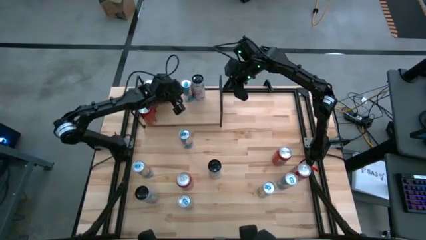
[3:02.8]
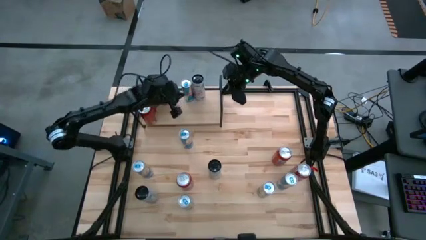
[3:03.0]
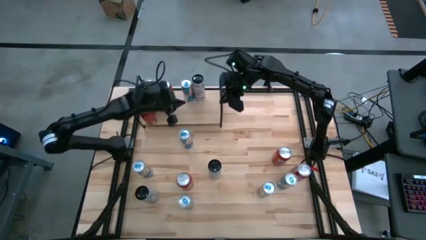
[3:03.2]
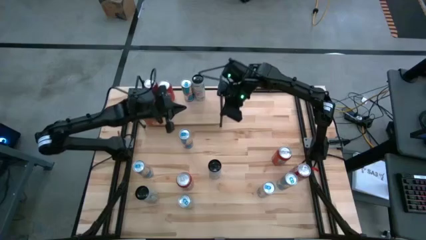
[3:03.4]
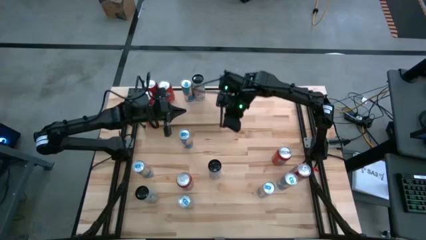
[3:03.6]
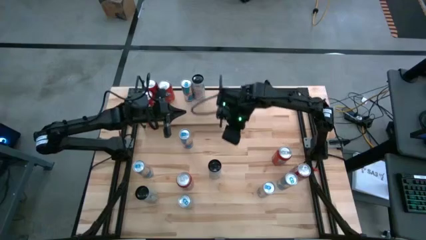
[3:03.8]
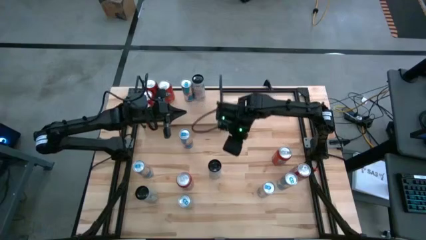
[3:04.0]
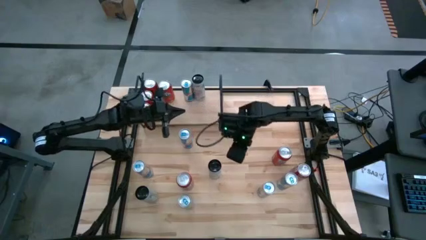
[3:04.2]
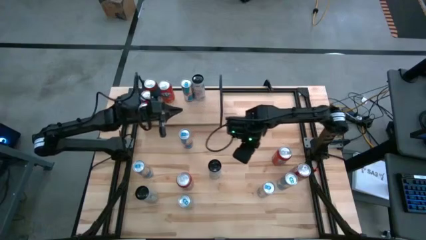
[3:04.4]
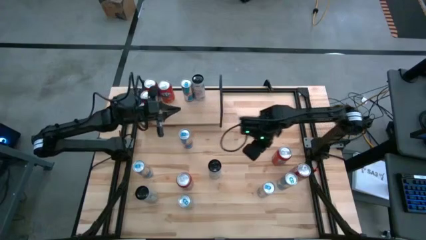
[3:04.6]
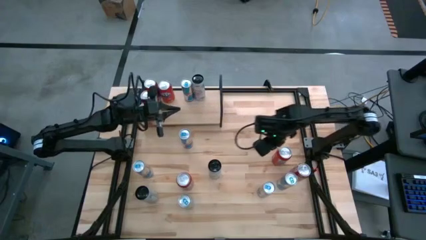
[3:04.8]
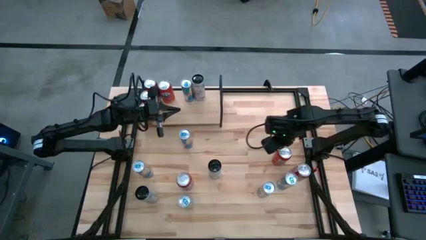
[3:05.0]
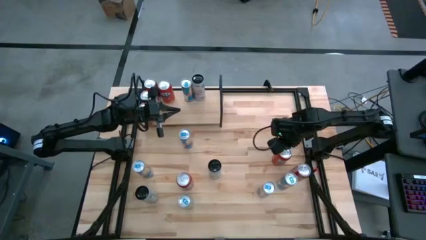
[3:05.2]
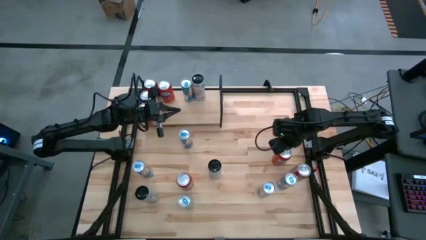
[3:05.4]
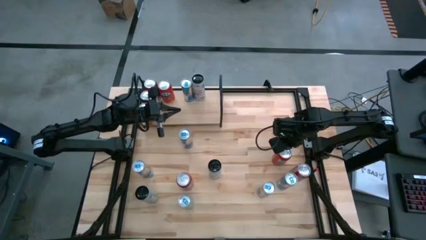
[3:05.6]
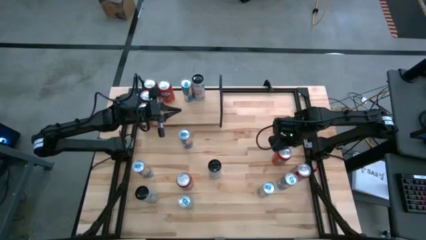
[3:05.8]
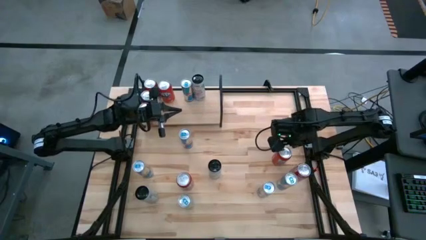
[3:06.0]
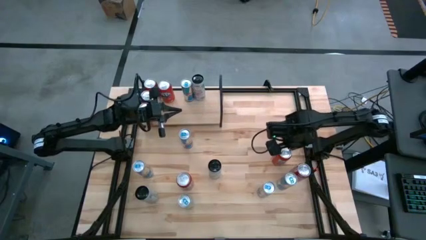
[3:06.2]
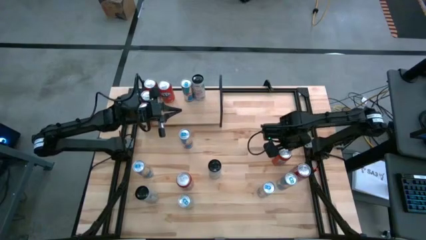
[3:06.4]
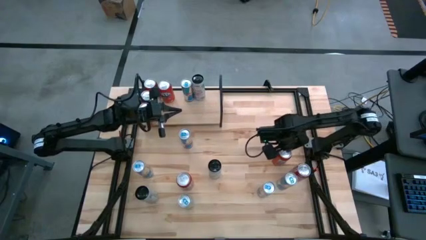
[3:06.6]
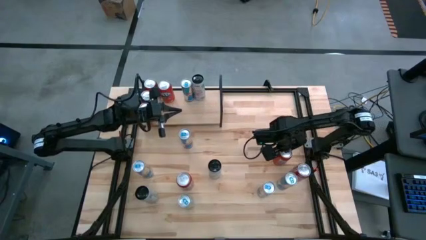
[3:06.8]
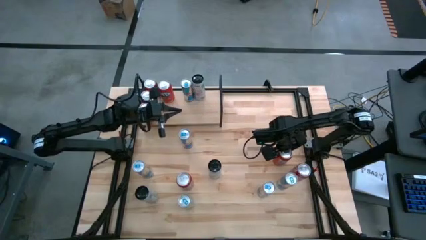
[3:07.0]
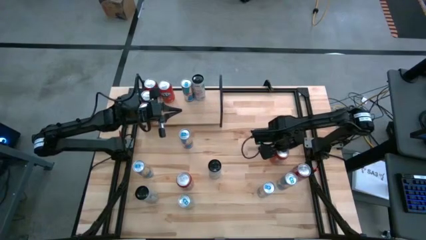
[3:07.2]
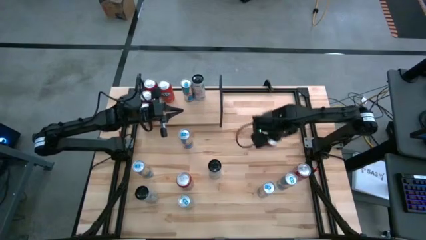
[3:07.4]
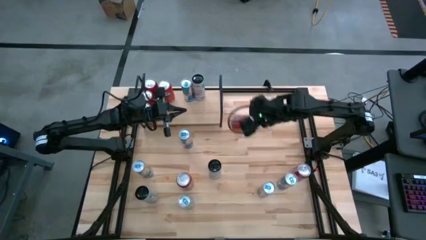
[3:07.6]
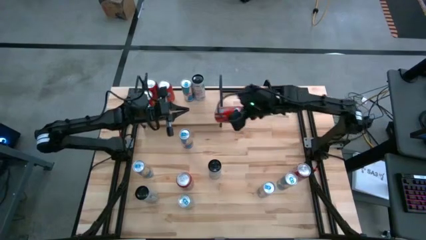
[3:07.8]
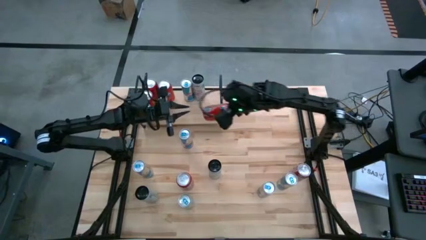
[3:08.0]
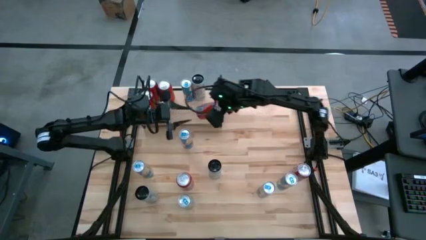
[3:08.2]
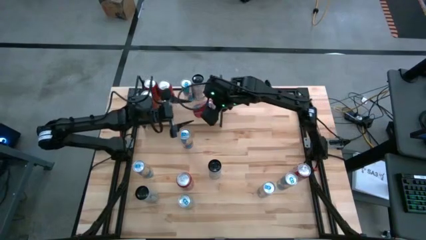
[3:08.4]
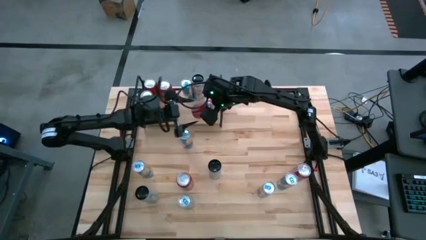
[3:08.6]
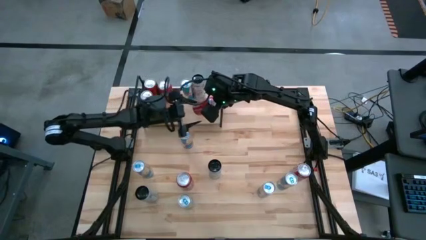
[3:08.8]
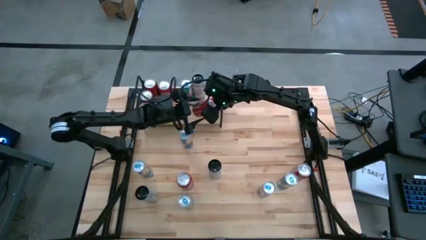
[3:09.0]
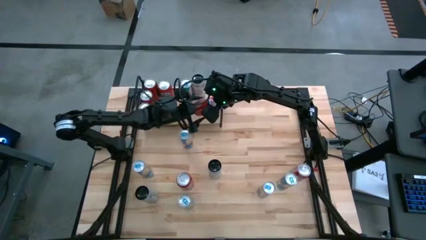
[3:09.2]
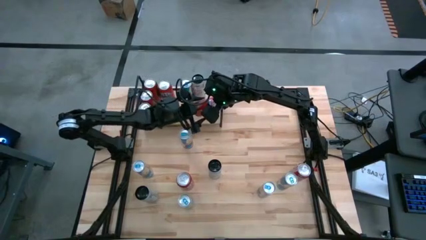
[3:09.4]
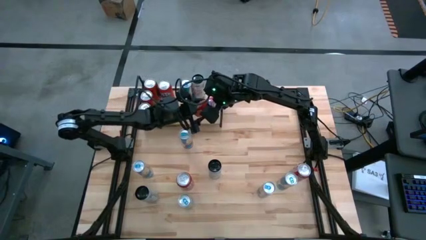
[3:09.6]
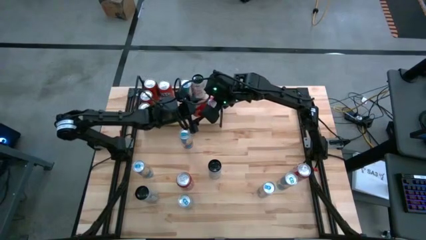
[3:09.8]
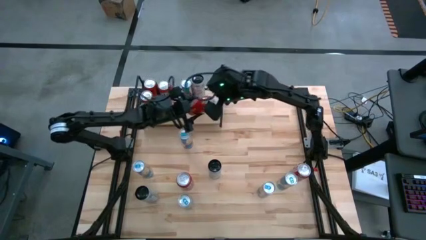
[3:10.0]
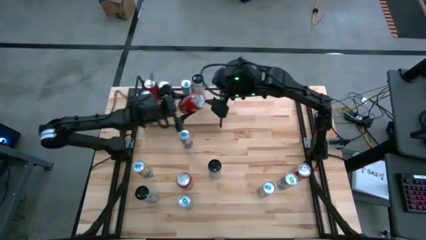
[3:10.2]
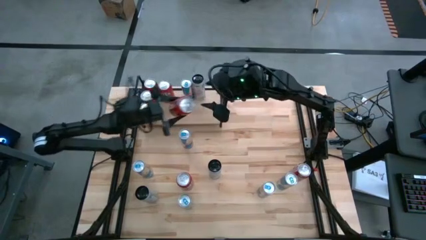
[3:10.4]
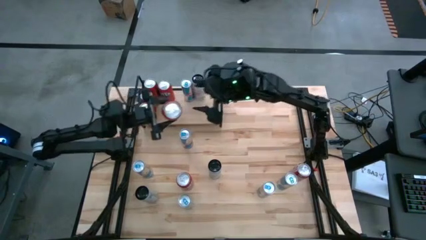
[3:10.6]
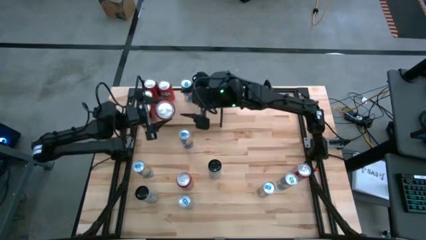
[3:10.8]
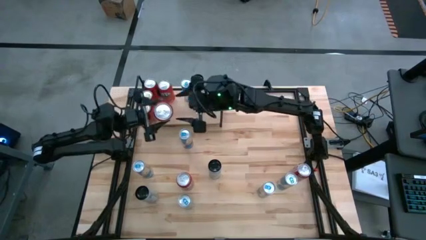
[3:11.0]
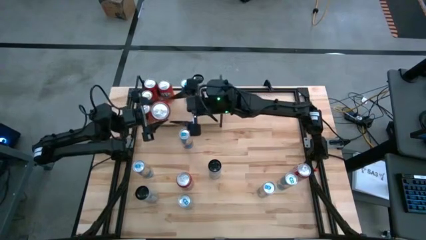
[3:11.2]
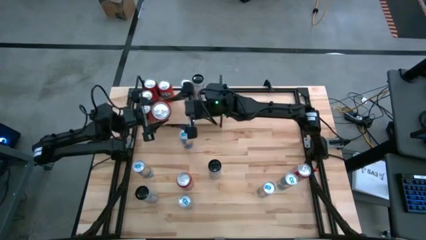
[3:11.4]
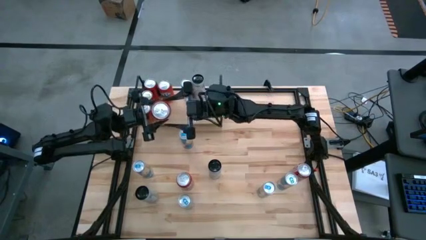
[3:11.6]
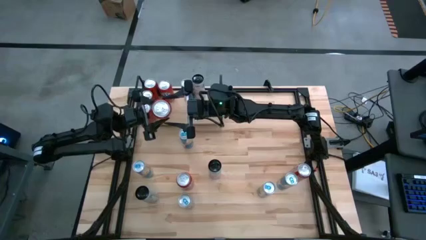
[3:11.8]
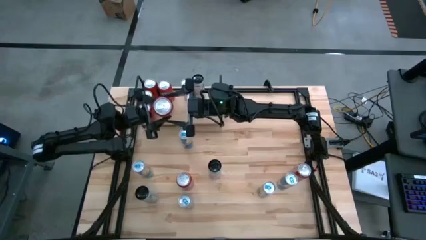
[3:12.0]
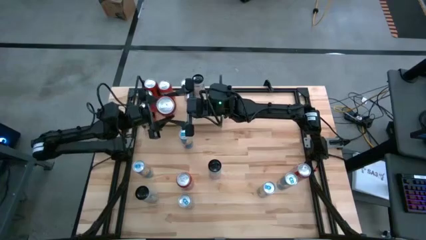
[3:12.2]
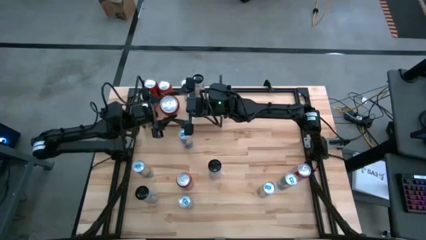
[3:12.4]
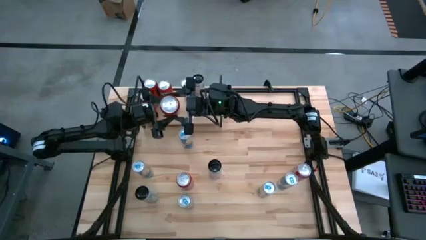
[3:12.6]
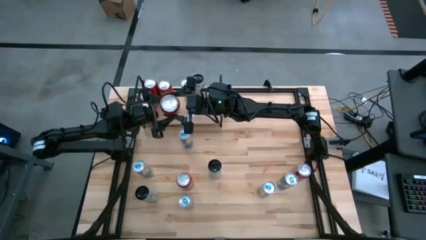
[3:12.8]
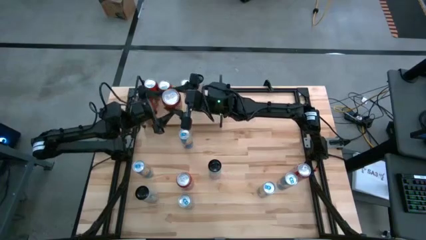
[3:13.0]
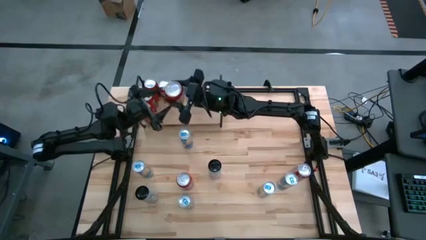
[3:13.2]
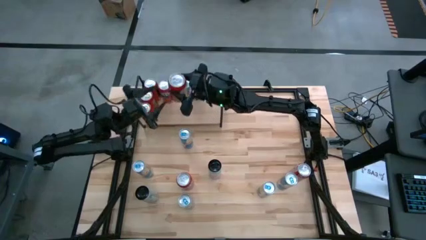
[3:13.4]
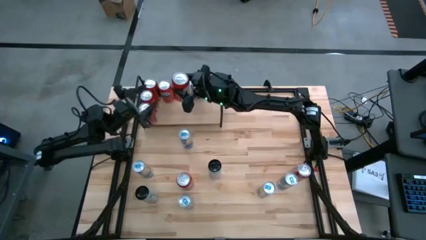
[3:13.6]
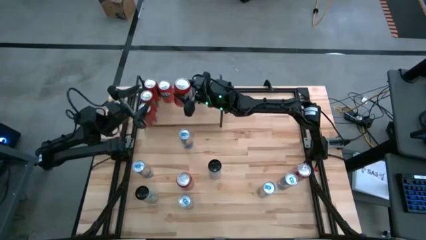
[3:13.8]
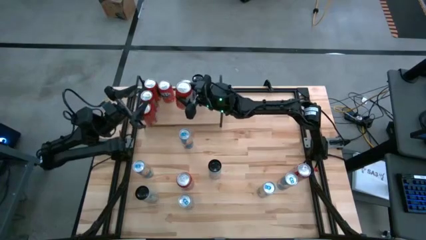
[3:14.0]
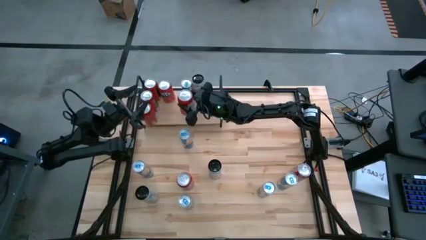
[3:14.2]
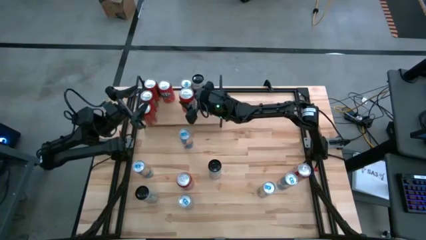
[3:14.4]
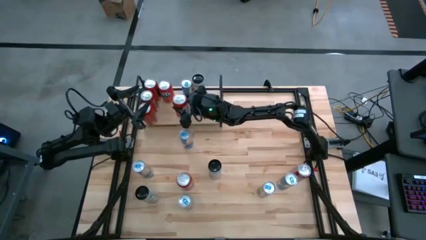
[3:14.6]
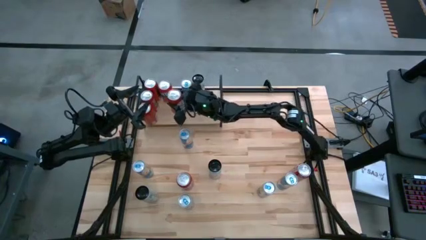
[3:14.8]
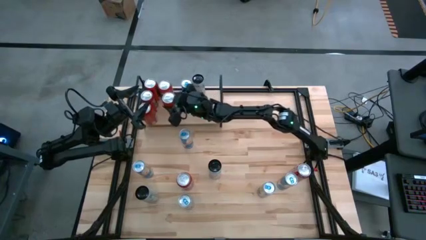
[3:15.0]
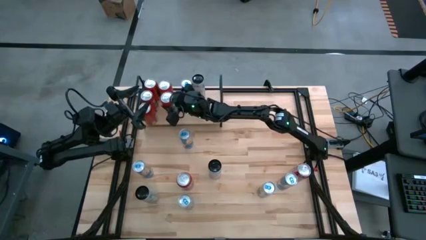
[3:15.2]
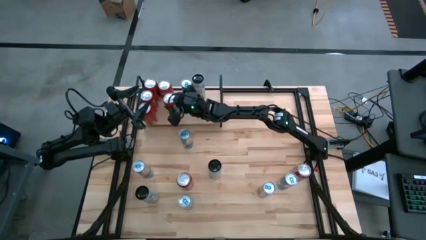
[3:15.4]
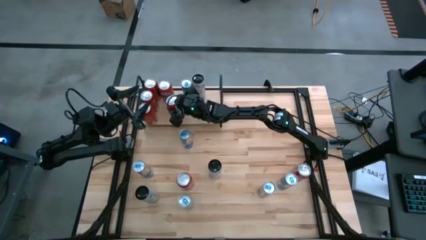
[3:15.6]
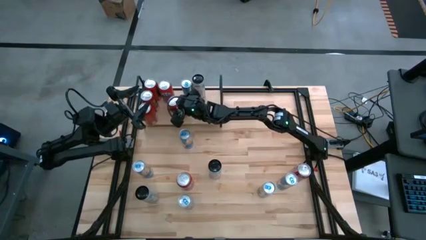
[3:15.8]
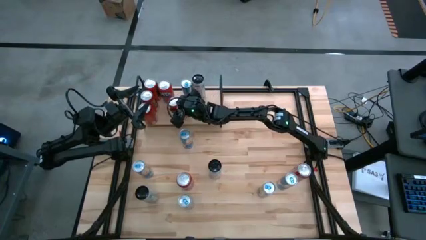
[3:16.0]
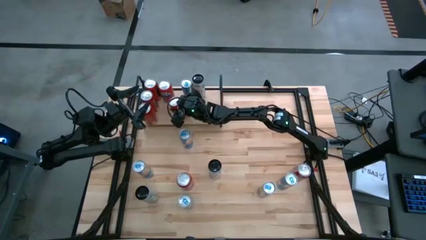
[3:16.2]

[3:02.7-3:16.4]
Task: Place canned beverage on shelf
Put the red soda can on the shelf aligned with the other red soda can
